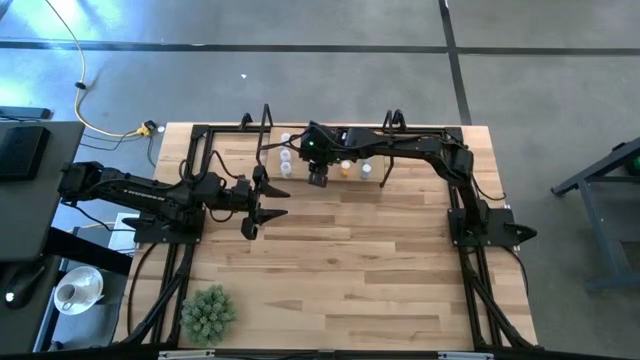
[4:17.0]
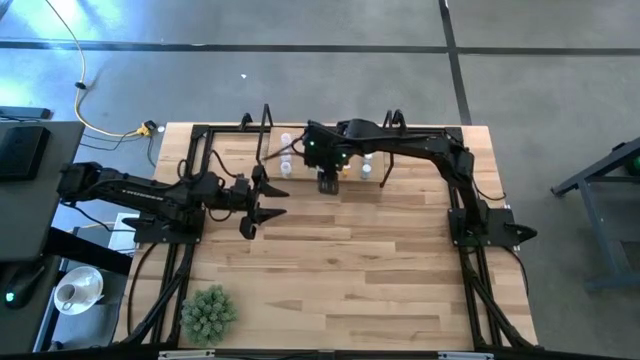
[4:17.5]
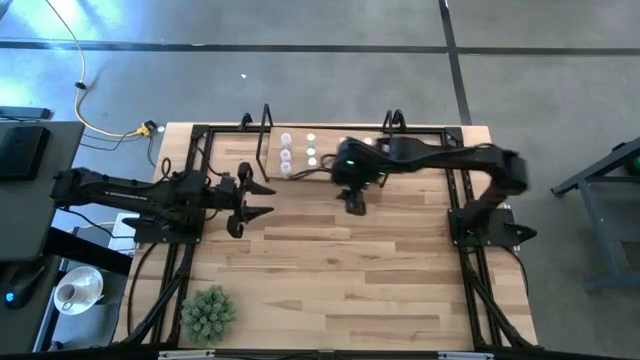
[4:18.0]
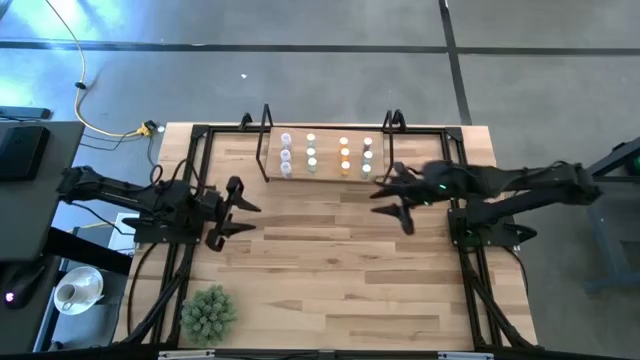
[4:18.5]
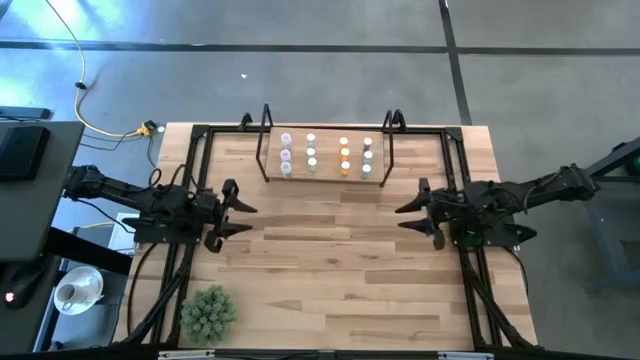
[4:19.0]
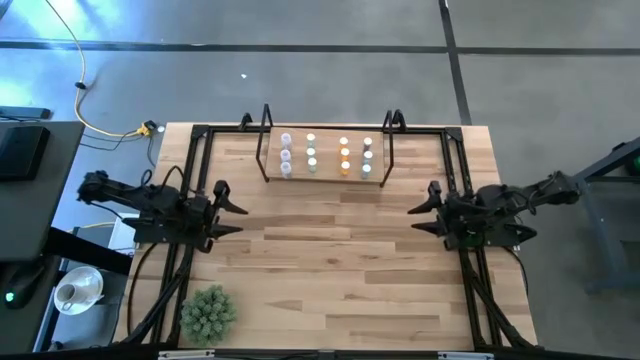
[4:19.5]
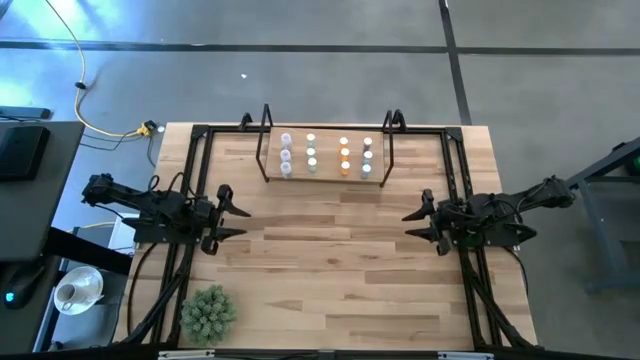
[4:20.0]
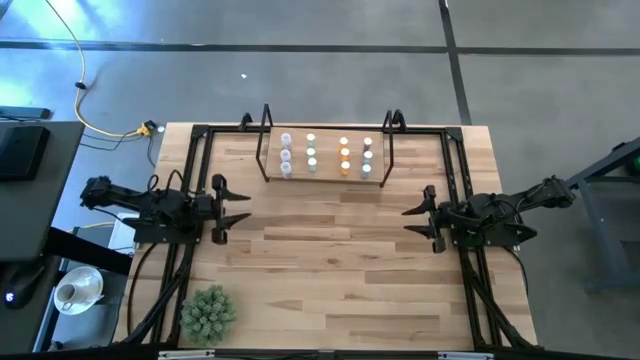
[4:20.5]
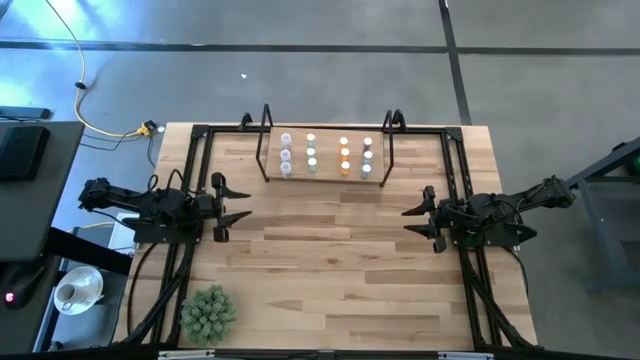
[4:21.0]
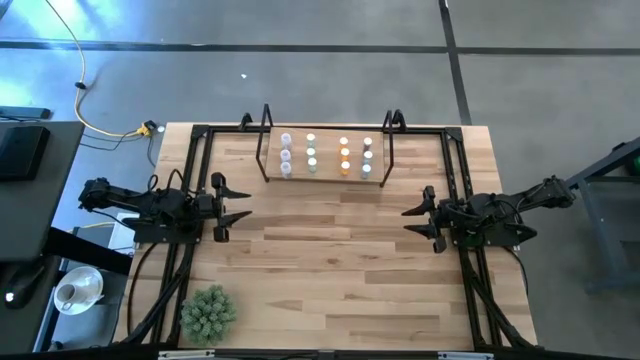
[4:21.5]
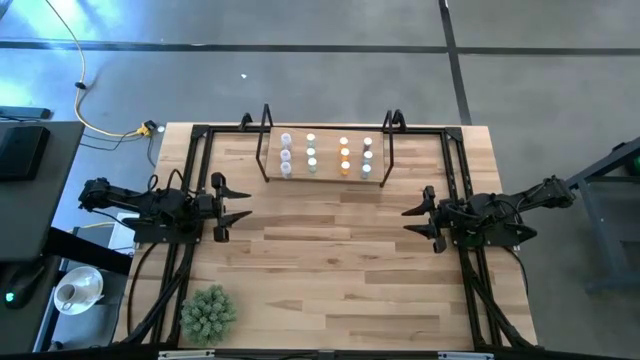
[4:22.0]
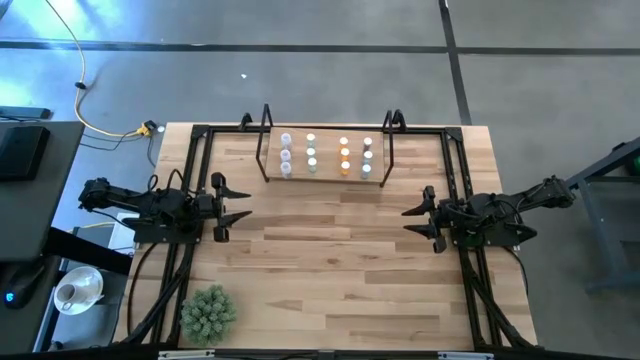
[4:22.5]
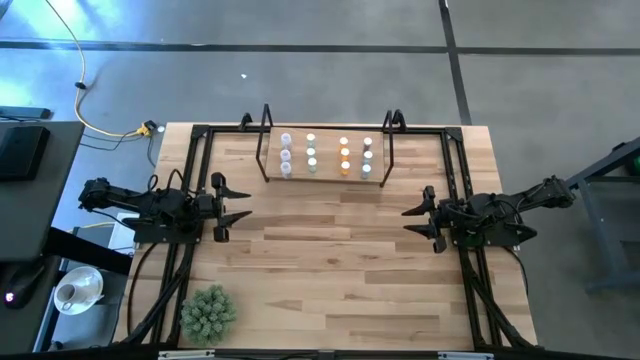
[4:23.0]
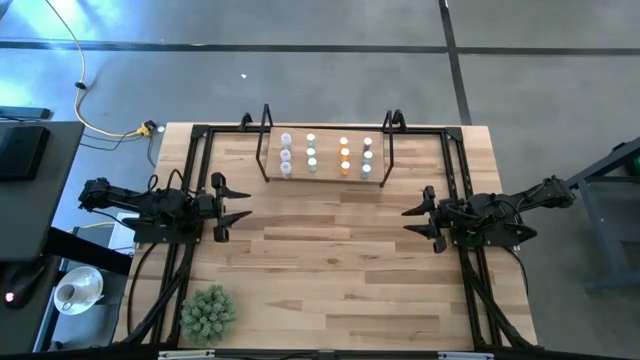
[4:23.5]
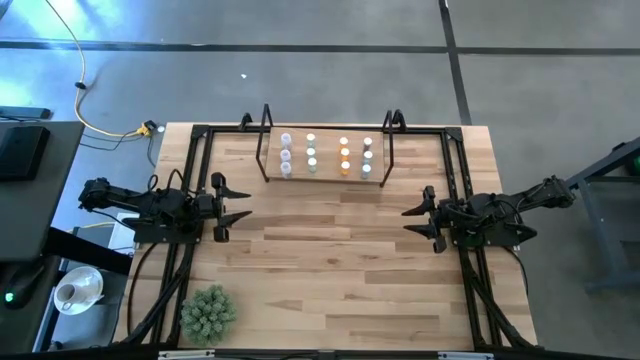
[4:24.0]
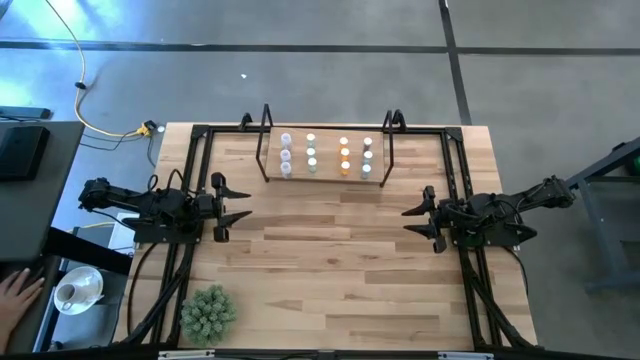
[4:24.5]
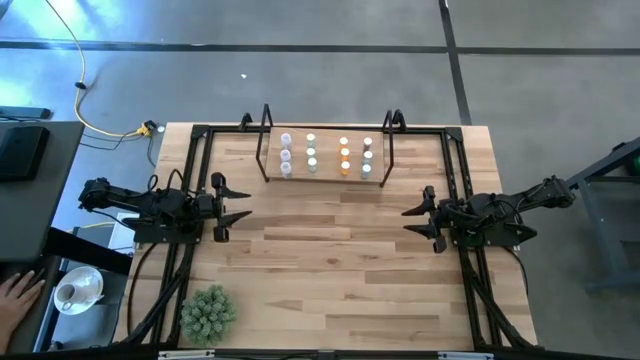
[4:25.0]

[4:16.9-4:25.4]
Task: Pick and place medicine bottles onto shelf by color
Return to Home Position

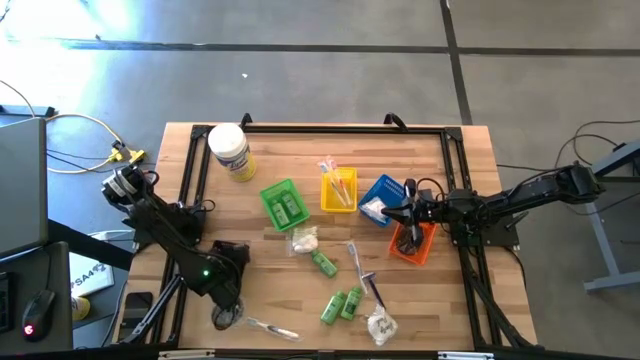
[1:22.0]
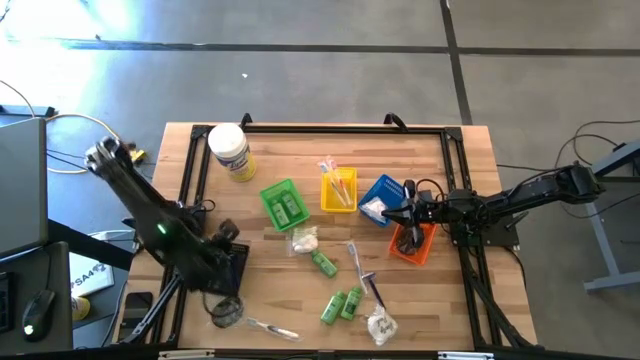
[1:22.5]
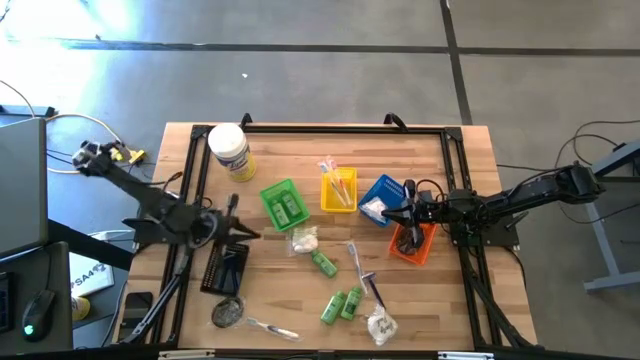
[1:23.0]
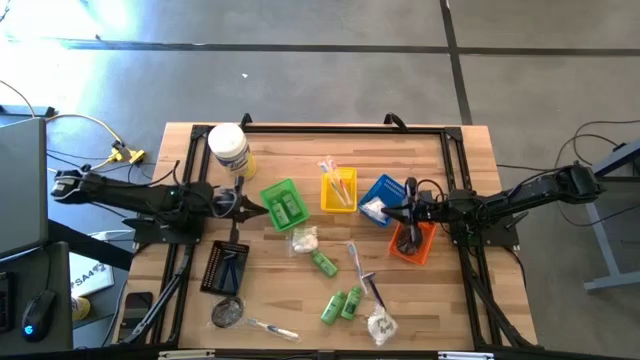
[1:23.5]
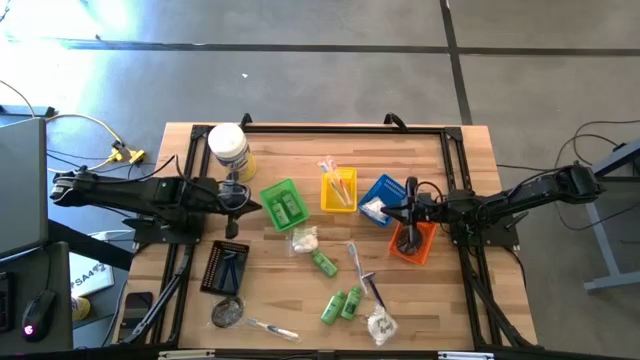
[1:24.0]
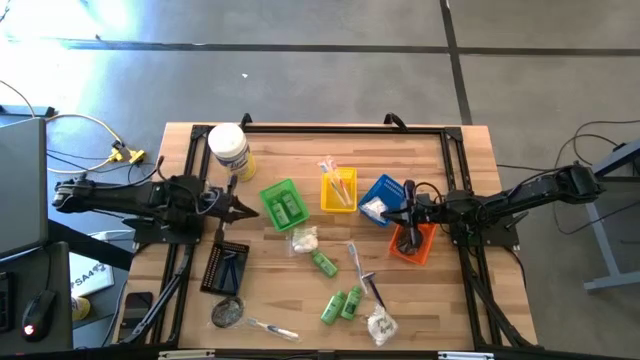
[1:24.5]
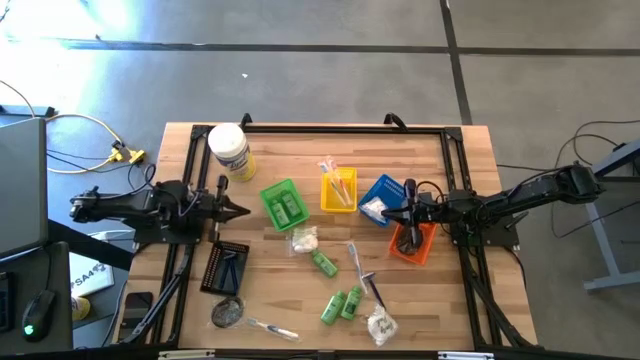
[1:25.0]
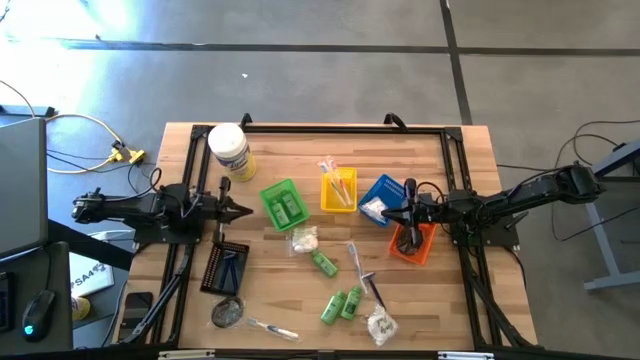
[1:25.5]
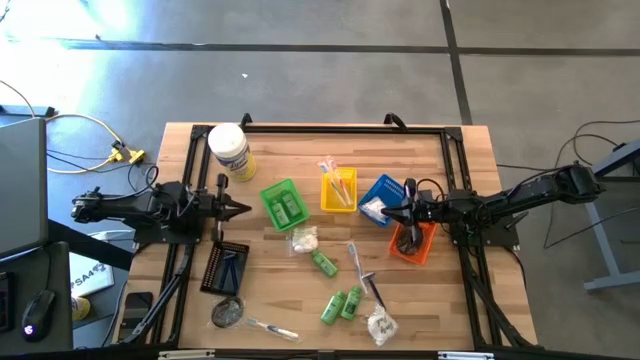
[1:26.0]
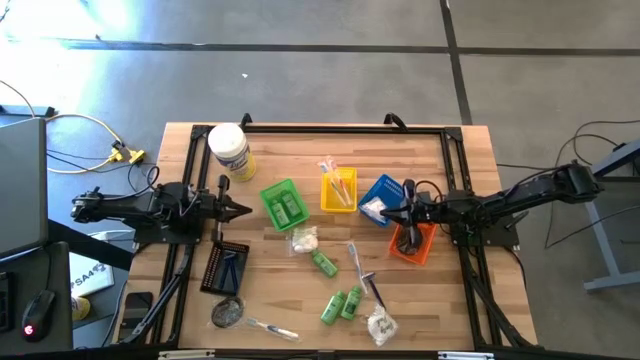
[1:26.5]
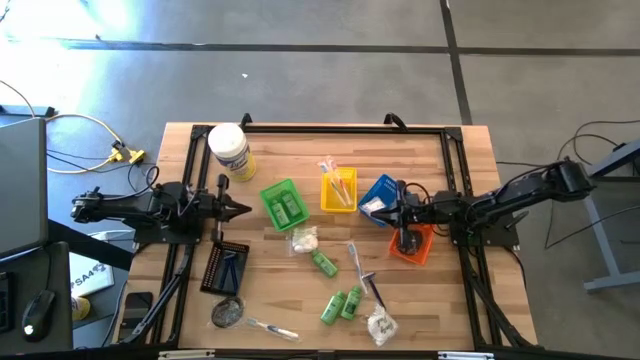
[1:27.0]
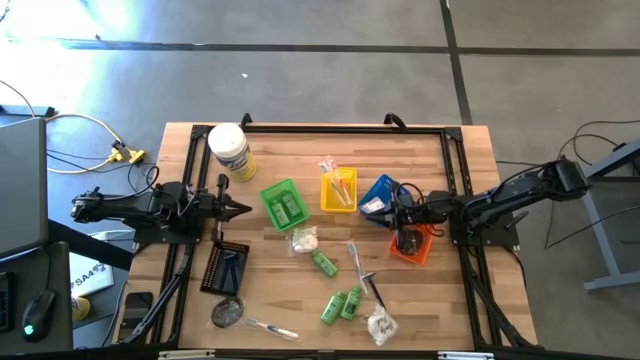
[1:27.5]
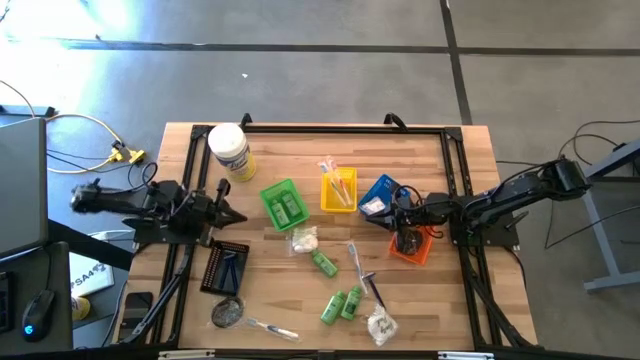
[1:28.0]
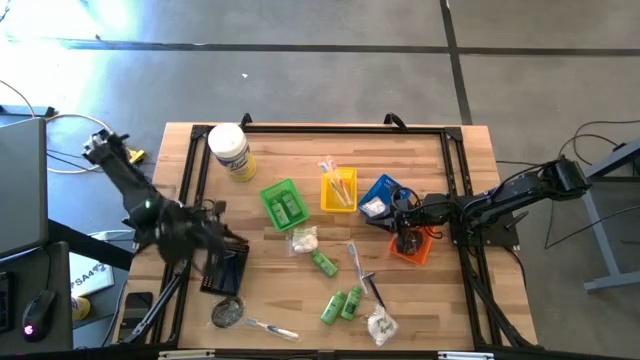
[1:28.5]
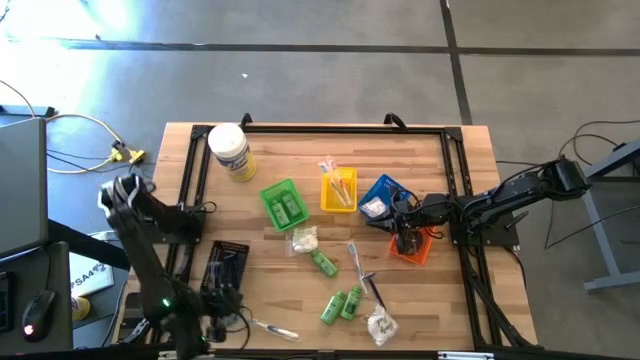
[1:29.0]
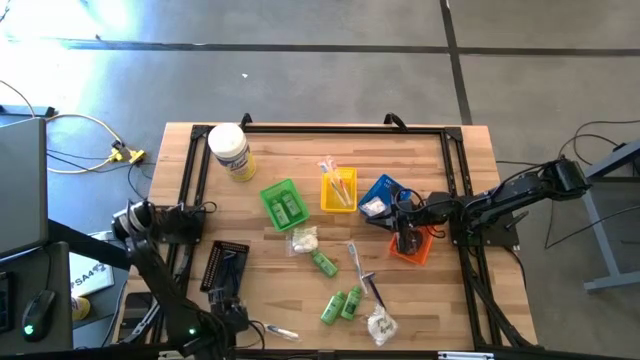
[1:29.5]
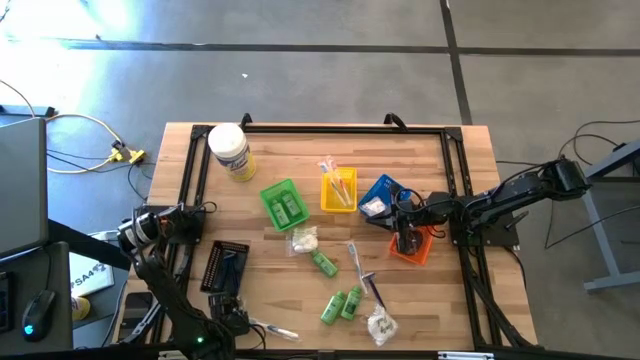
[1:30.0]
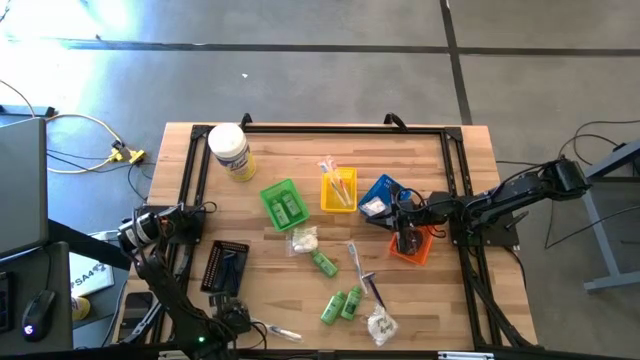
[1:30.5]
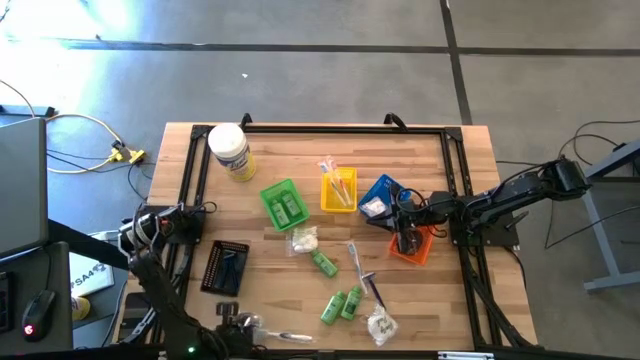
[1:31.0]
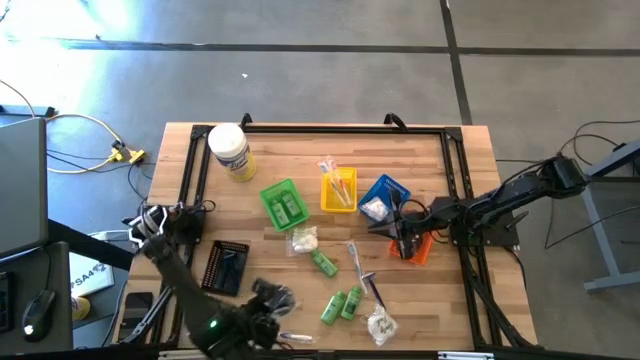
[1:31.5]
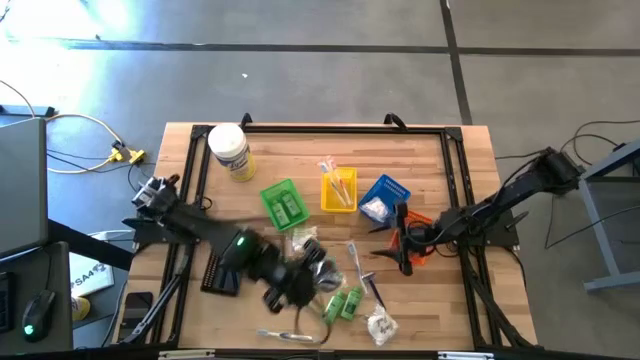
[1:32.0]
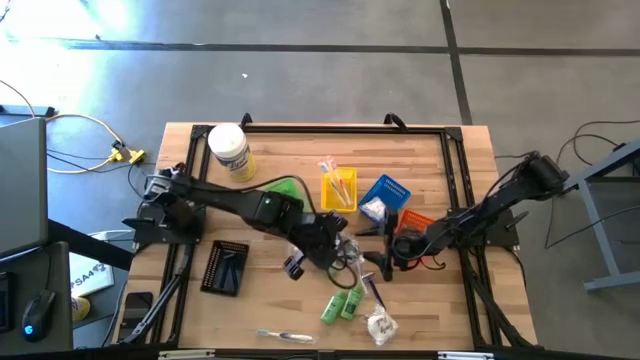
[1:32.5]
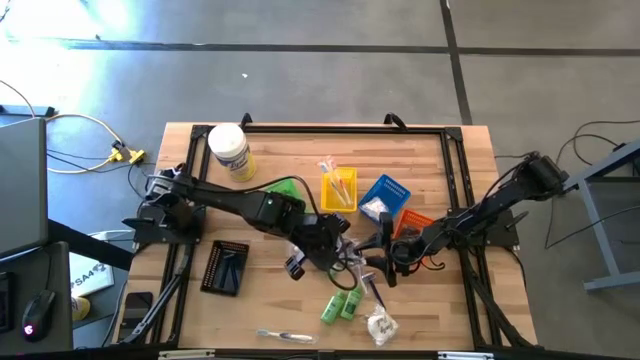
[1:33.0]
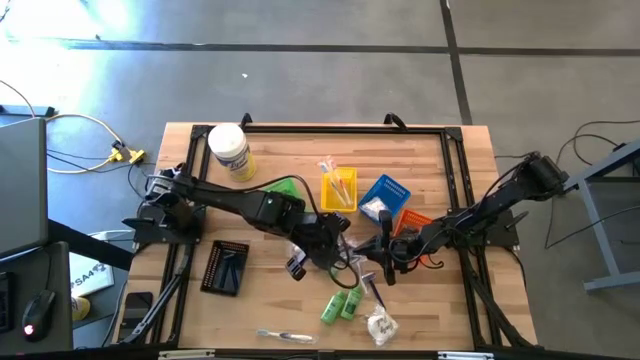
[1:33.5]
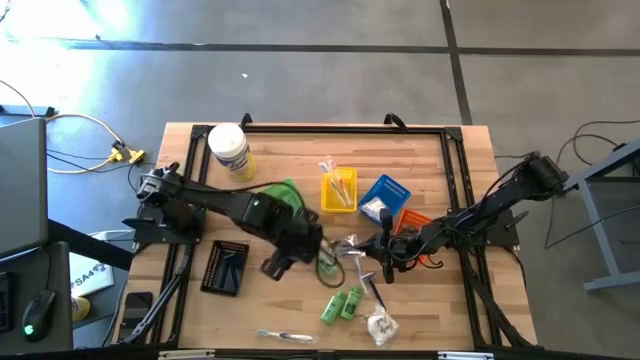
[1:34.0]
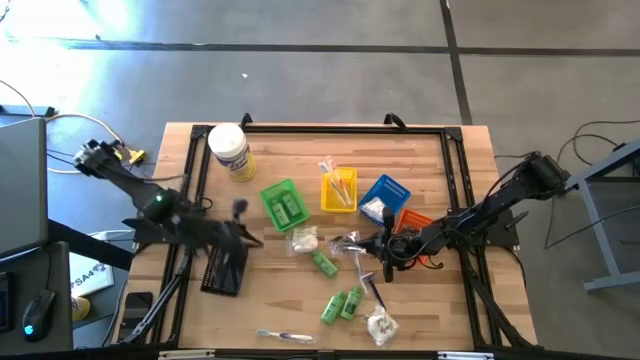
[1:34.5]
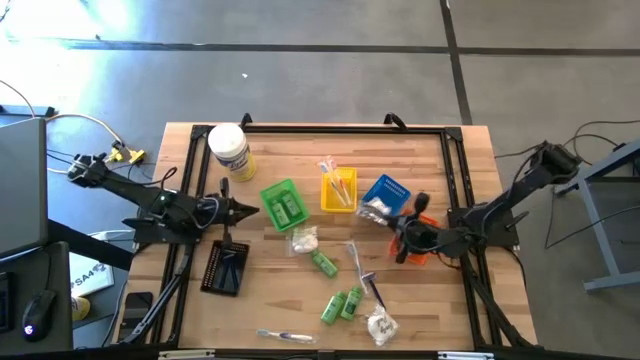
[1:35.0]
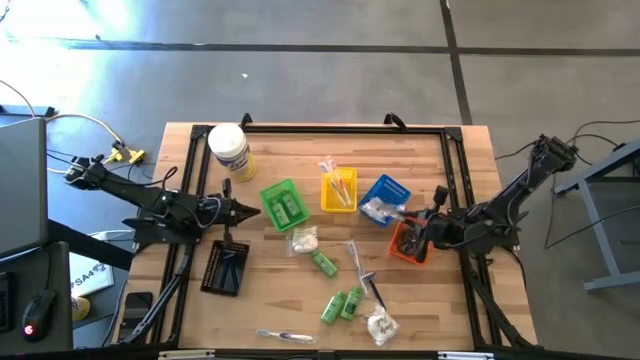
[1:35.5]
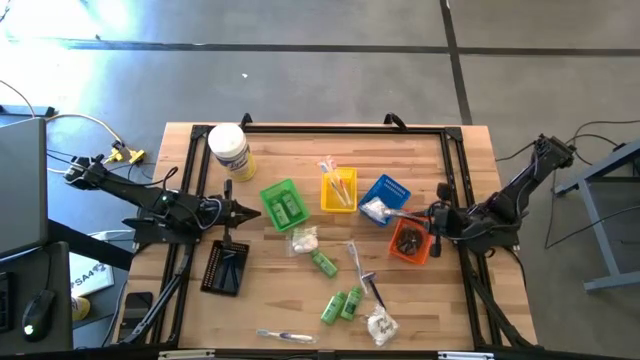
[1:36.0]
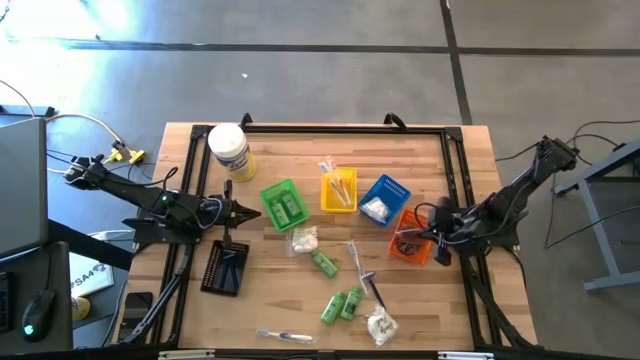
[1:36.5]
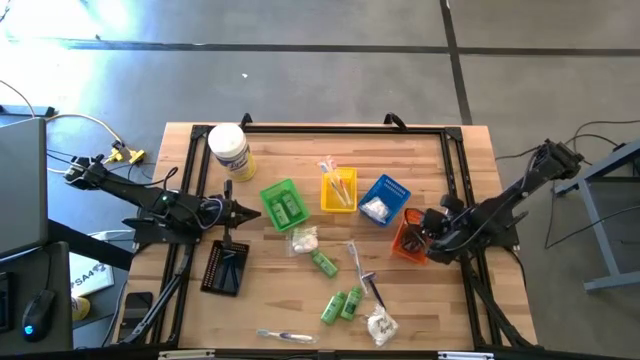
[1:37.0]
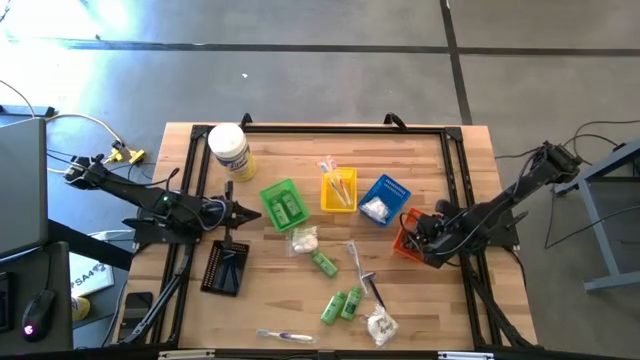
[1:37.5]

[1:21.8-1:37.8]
Task: Pick & Place Travel size toiletries
Put the hairbrush into the orange bin
